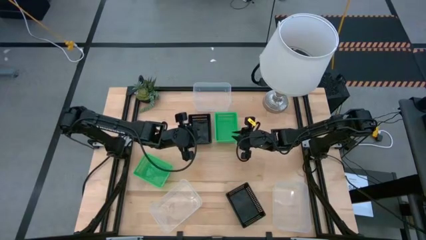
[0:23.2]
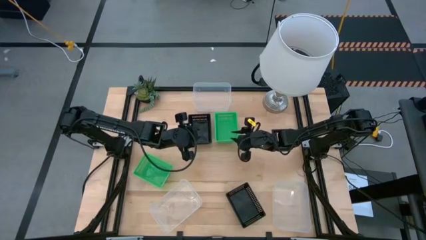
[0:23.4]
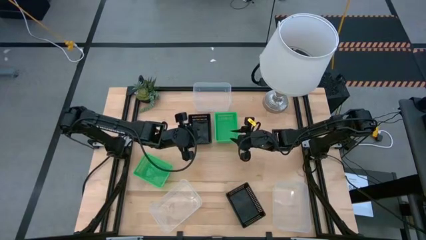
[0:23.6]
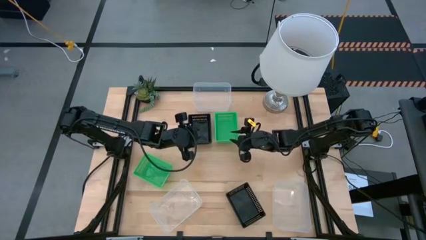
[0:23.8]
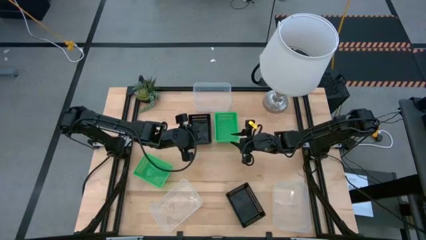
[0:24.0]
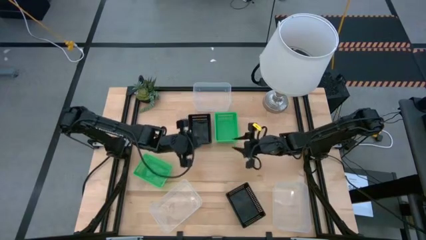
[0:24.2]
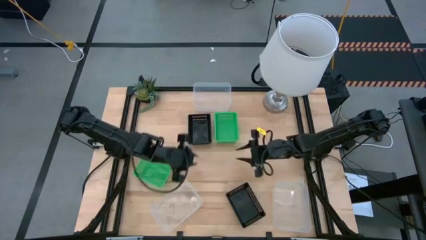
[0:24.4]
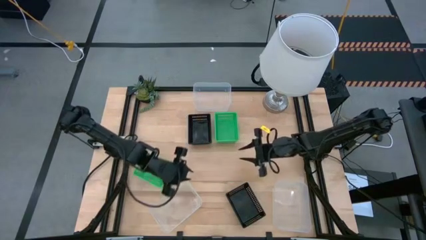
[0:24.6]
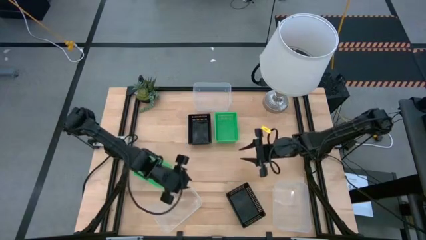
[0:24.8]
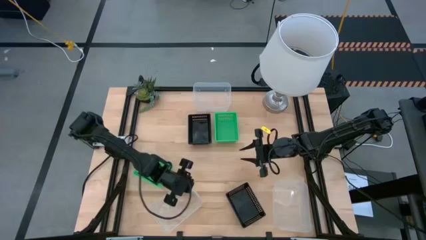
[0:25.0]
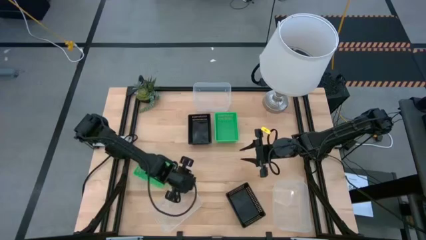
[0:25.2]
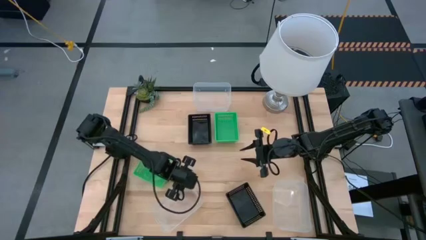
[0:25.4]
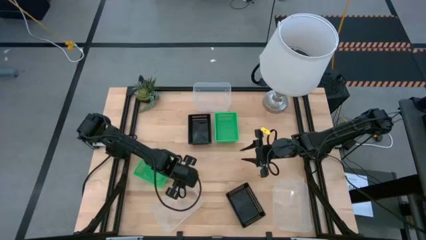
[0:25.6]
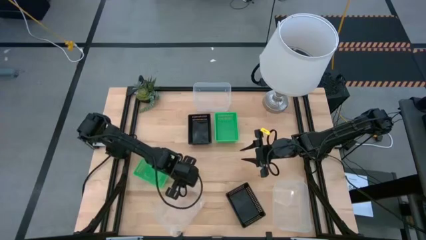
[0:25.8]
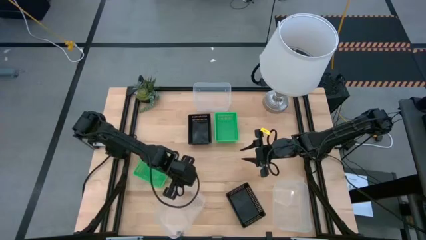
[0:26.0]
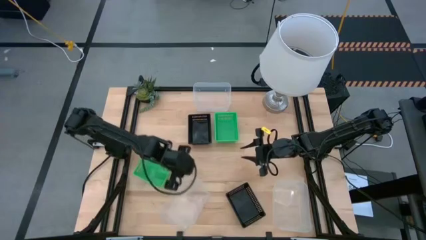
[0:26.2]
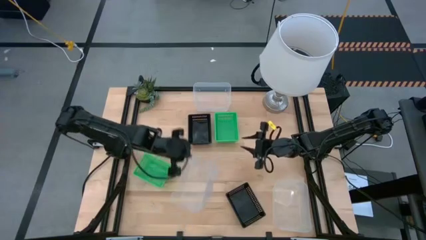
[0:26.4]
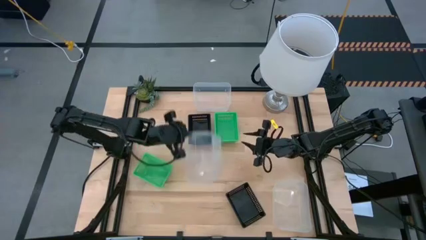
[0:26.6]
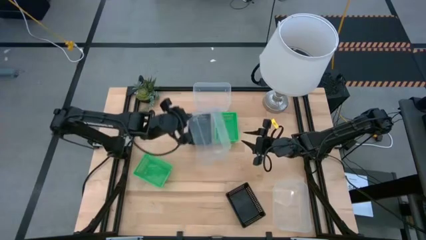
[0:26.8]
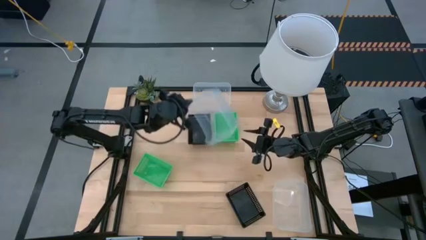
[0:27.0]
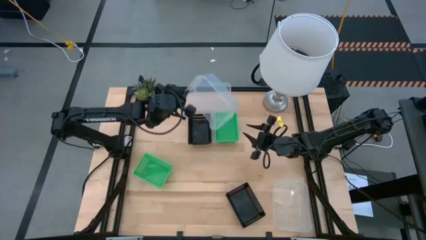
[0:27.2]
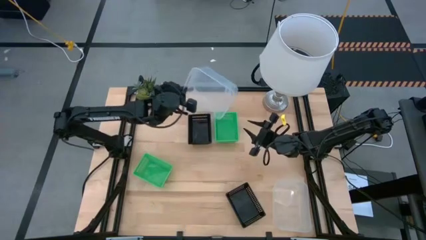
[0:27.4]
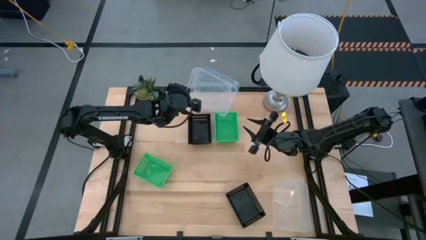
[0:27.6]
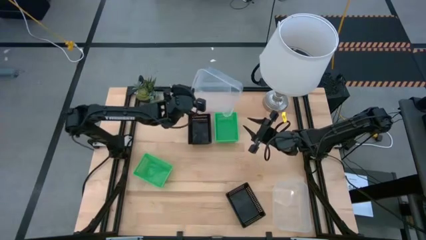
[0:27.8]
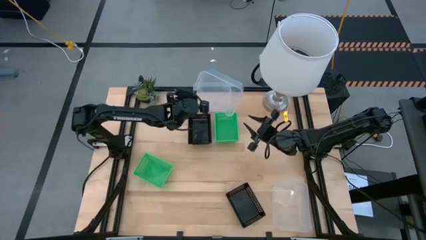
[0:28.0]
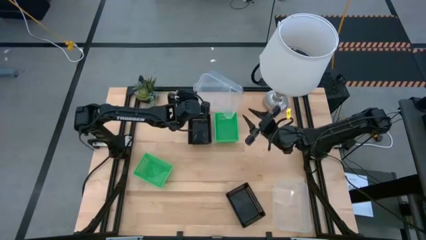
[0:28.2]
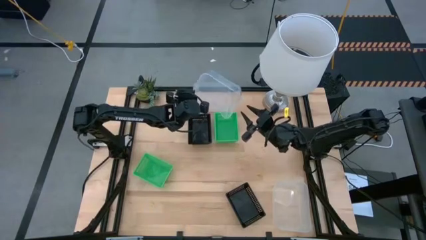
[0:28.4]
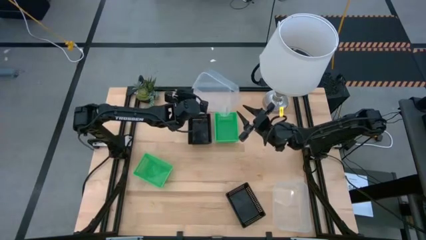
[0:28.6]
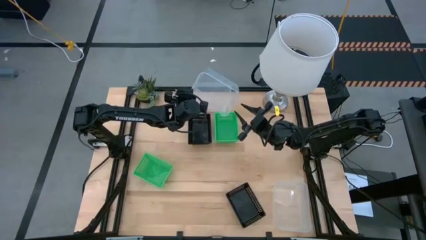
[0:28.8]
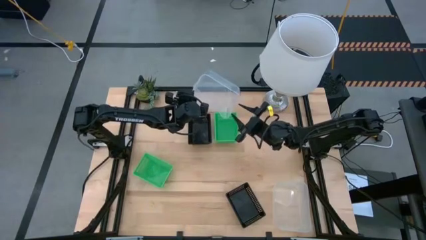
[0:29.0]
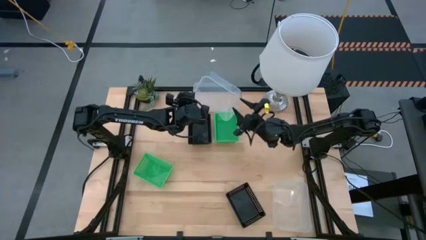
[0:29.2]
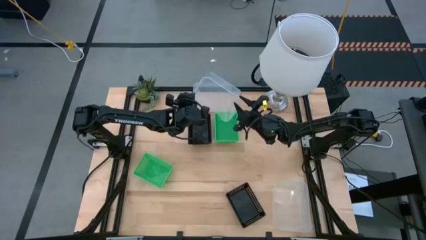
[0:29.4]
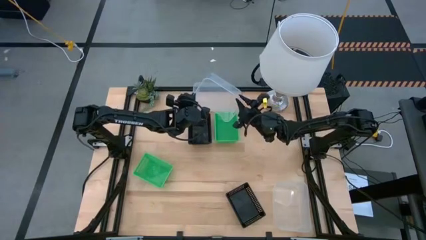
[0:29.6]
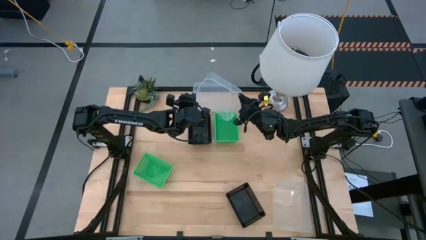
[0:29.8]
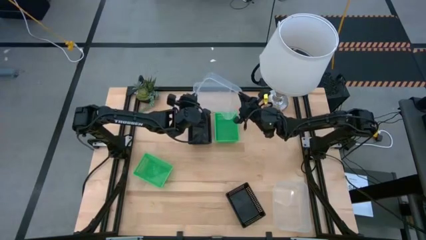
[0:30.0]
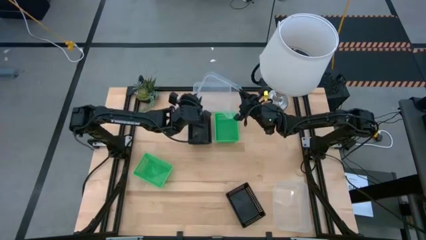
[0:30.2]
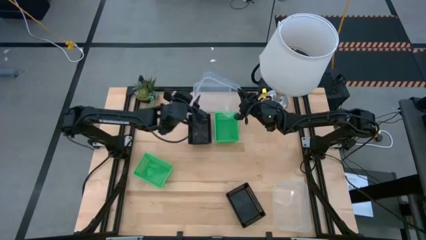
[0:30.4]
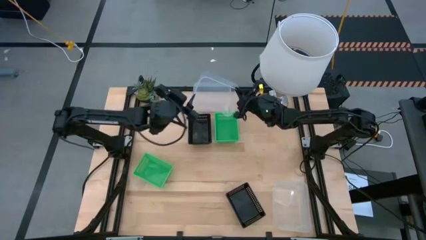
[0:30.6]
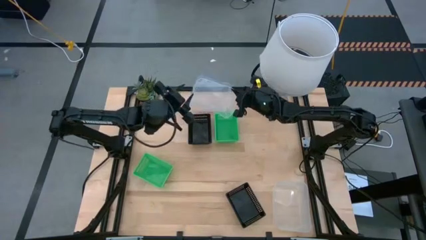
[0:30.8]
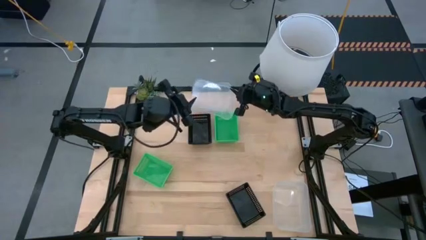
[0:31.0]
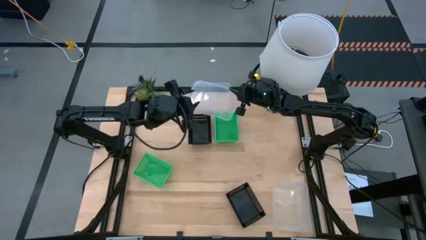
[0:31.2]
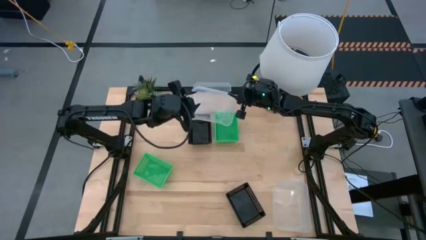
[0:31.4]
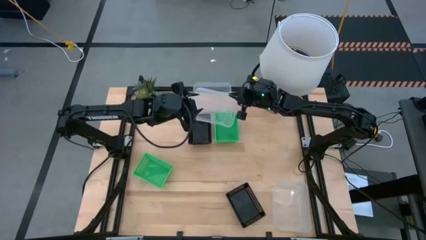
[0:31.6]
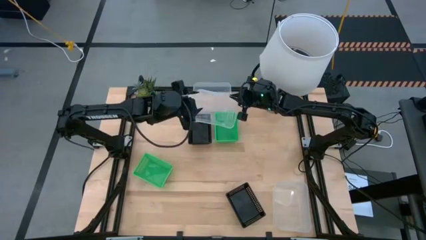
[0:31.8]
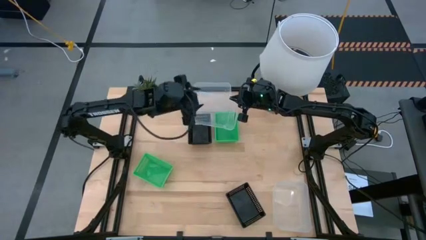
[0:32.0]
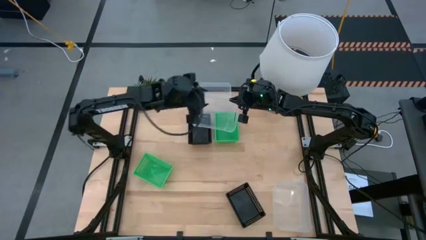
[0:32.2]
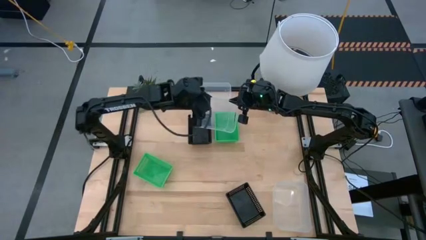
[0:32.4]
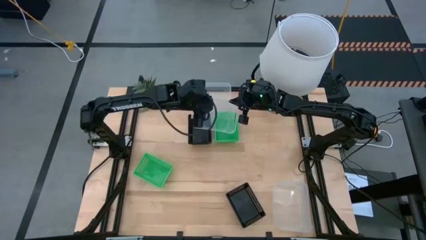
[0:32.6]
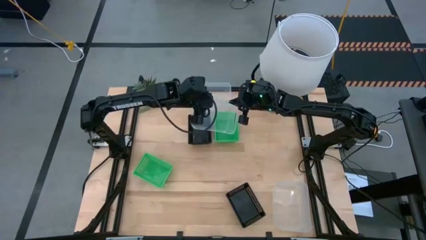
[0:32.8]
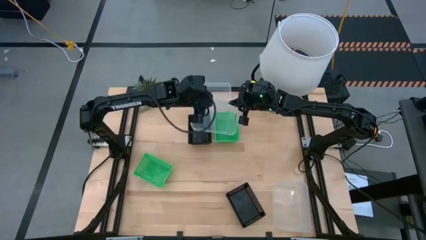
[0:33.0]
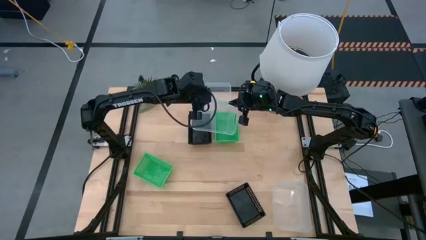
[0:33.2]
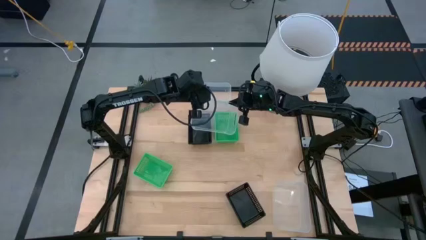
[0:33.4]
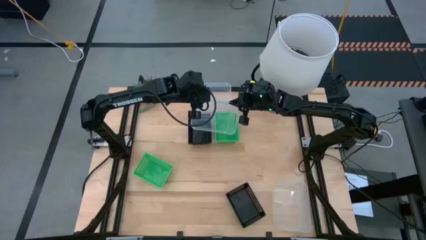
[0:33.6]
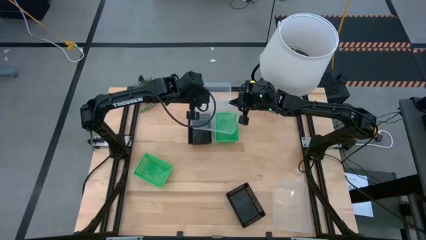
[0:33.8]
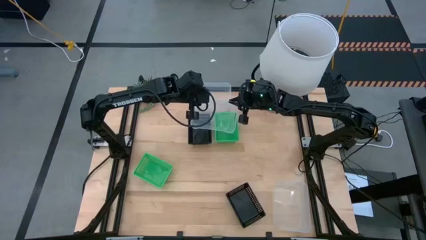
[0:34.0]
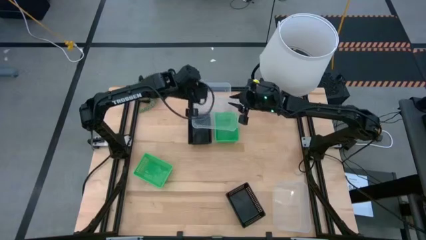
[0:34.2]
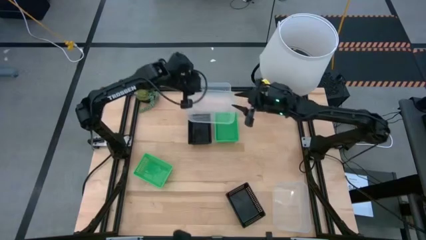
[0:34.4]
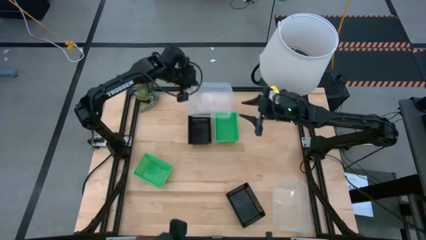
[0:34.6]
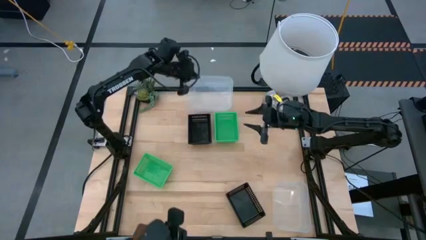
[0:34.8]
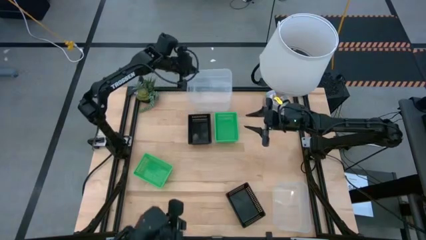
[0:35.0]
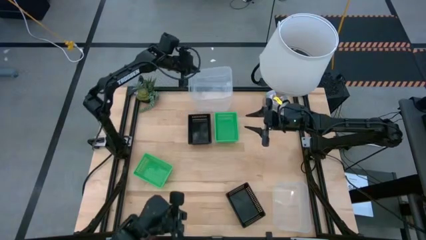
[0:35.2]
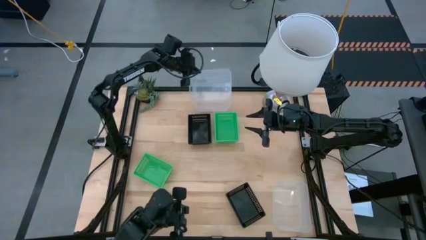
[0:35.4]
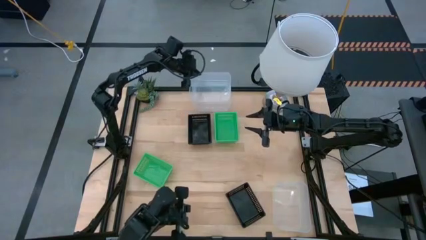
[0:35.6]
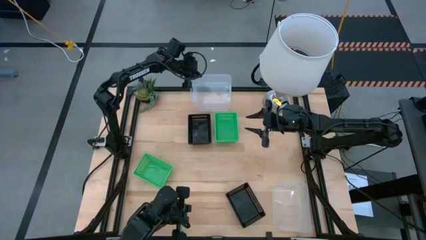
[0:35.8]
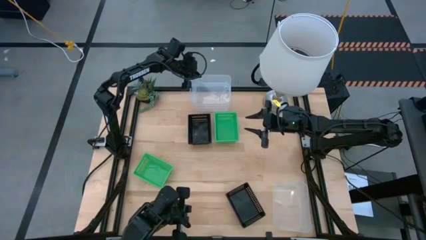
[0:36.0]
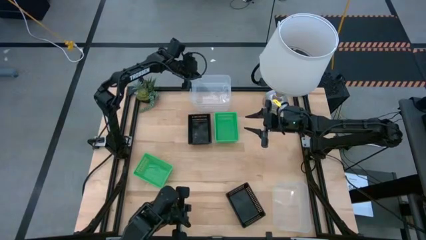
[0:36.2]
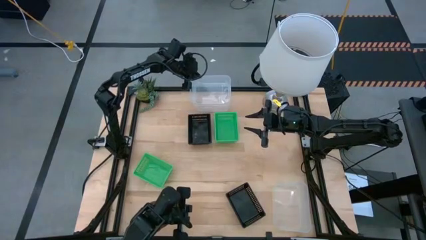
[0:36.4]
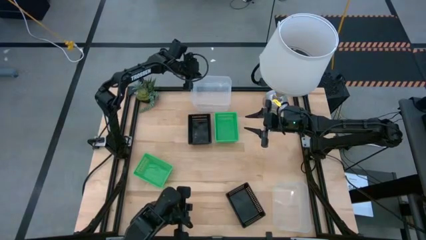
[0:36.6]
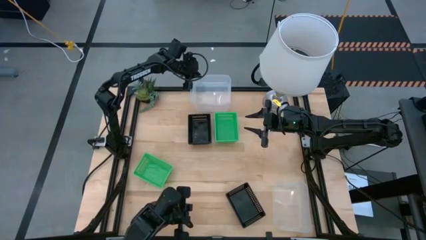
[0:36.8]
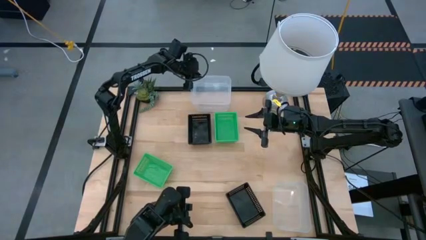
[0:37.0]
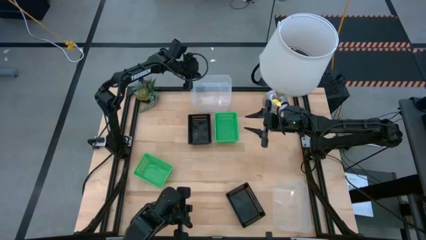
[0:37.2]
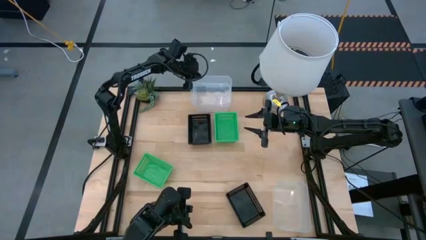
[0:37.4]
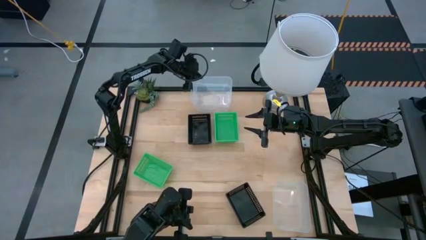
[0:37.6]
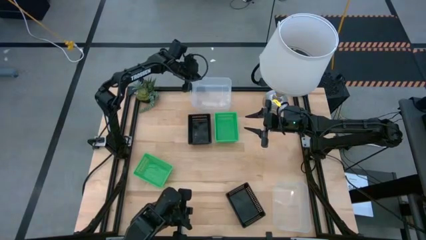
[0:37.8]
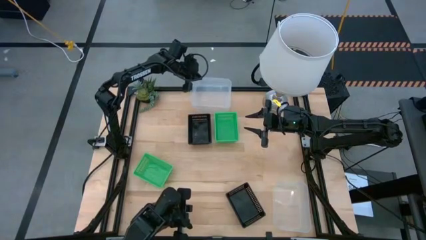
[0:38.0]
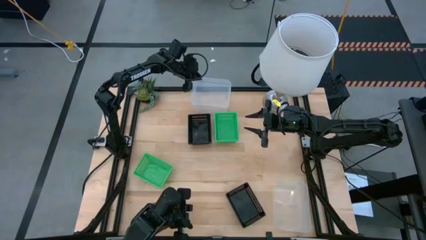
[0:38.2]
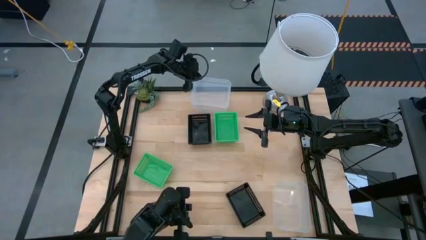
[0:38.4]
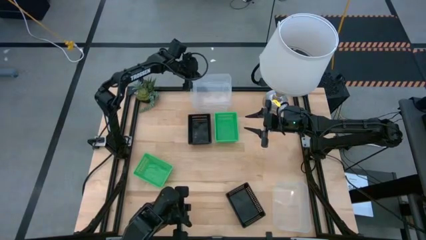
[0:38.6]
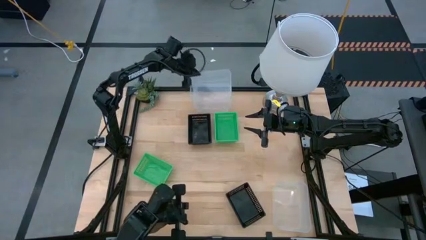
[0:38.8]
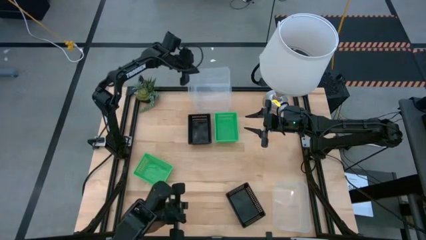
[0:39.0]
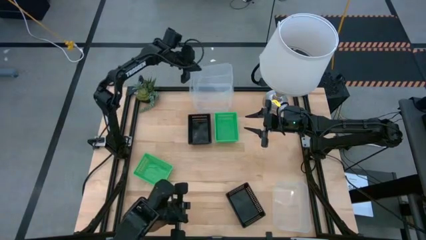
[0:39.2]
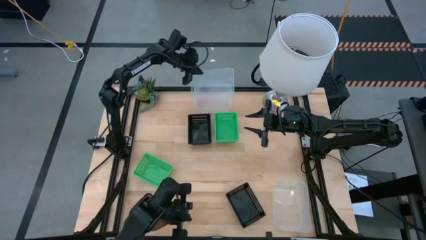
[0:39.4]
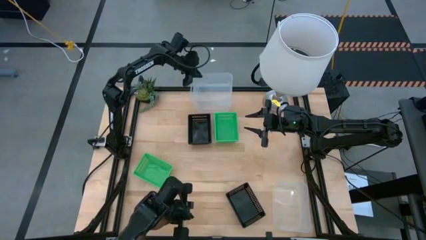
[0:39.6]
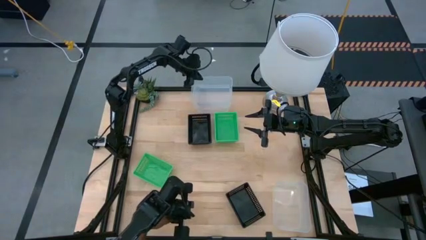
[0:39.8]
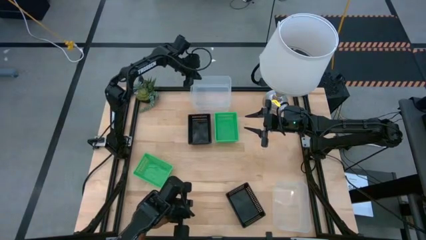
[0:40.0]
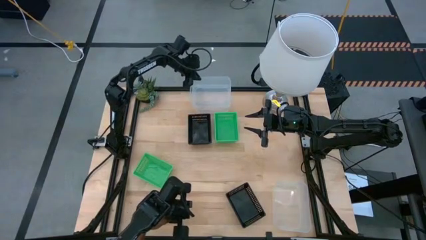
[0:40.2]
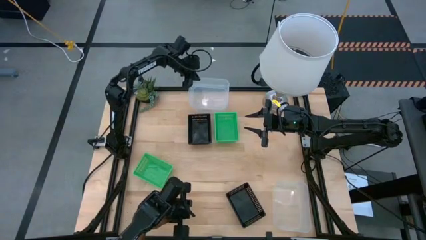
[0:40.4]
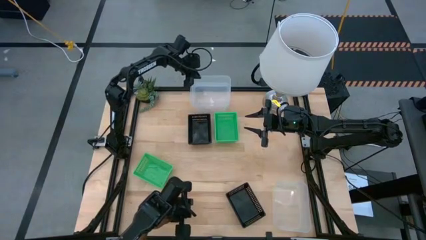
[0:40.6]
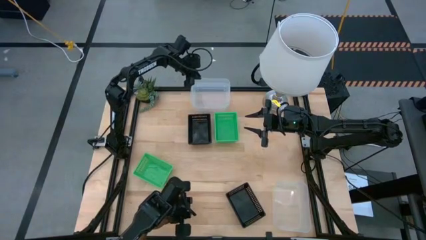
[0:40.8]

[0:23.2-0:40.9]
Stack the bottom left transparent bin on the top transparent bin
